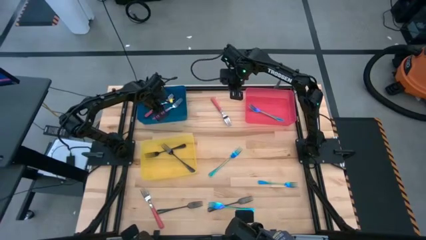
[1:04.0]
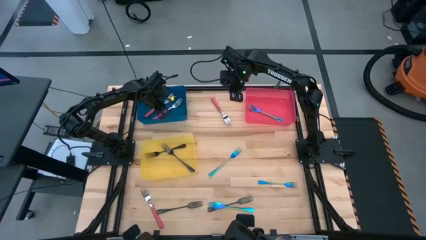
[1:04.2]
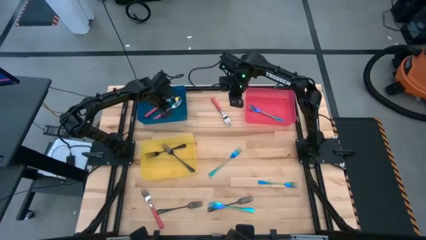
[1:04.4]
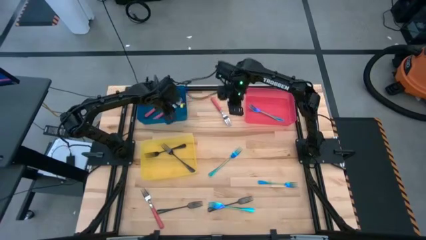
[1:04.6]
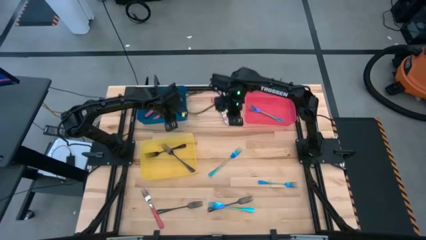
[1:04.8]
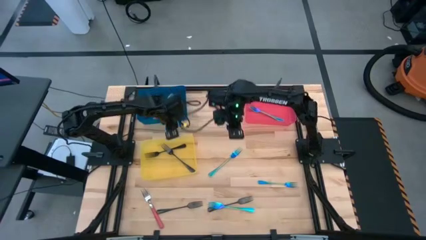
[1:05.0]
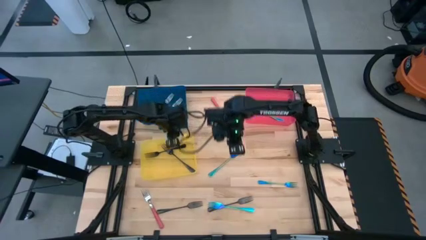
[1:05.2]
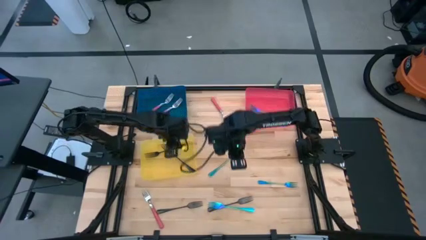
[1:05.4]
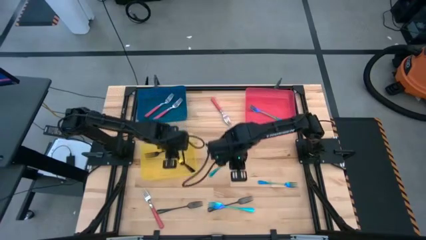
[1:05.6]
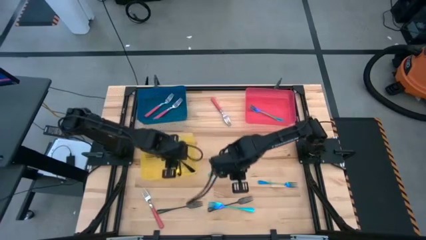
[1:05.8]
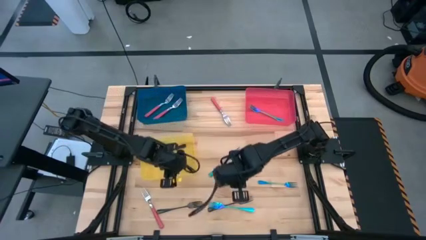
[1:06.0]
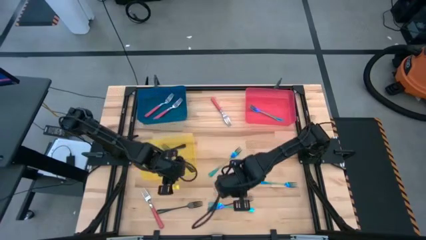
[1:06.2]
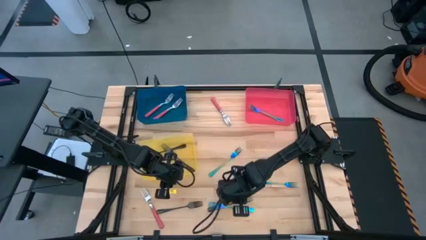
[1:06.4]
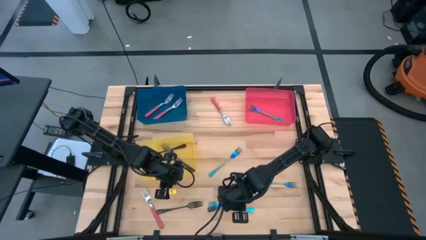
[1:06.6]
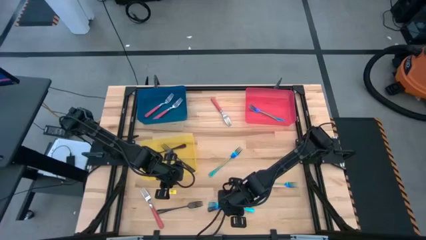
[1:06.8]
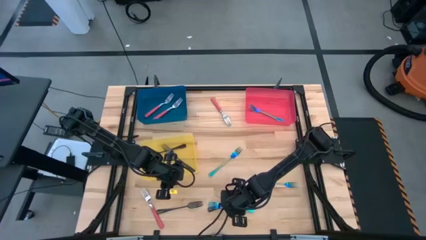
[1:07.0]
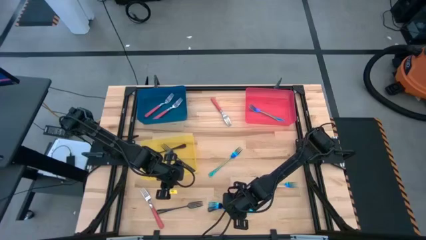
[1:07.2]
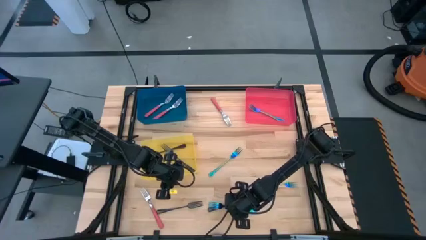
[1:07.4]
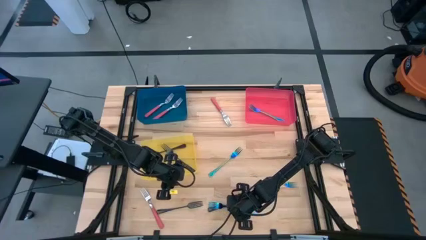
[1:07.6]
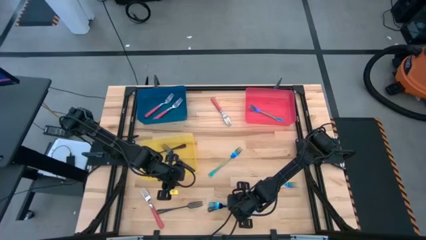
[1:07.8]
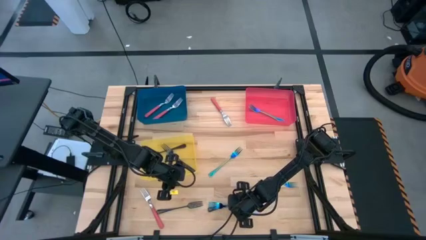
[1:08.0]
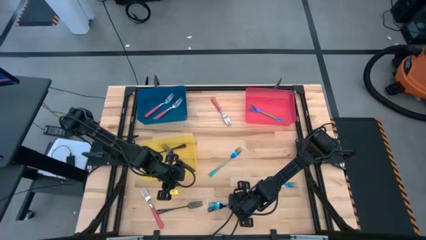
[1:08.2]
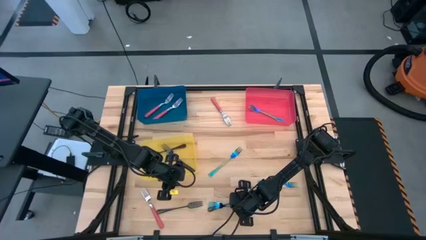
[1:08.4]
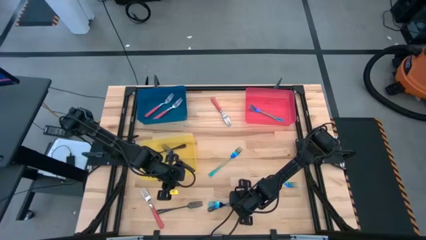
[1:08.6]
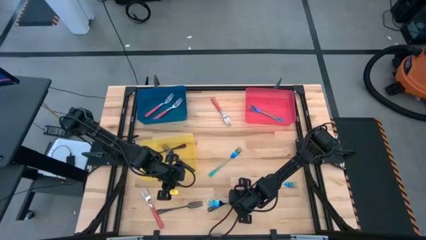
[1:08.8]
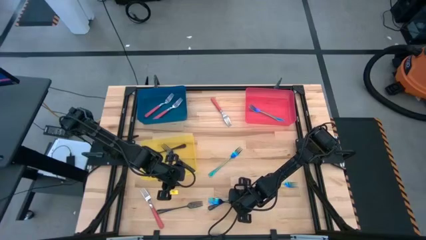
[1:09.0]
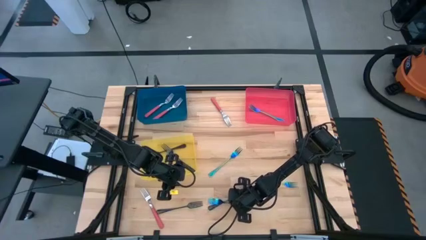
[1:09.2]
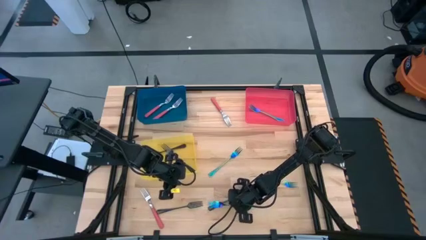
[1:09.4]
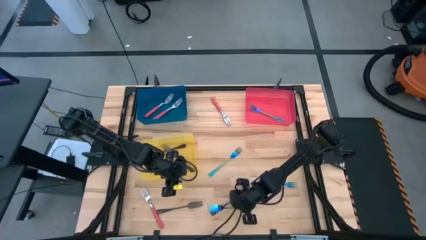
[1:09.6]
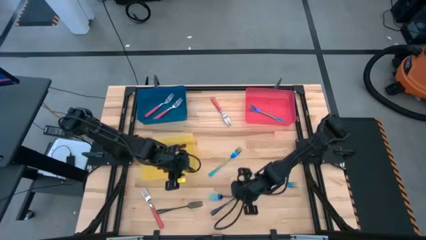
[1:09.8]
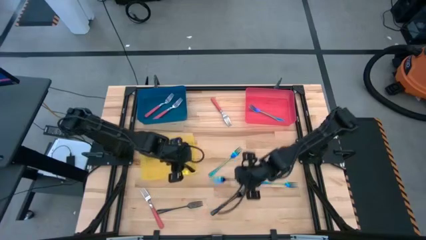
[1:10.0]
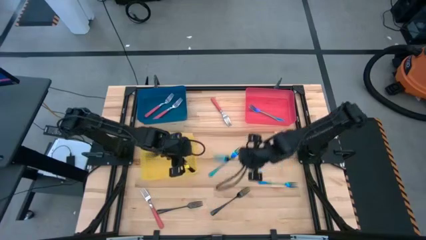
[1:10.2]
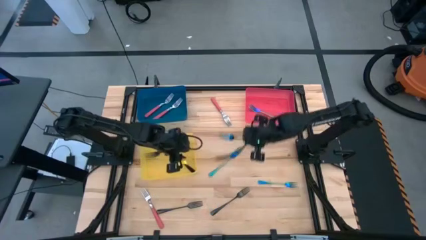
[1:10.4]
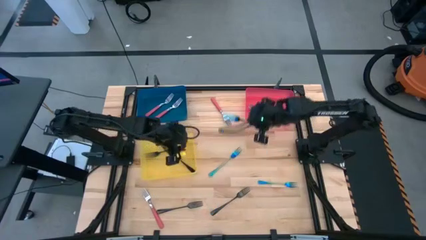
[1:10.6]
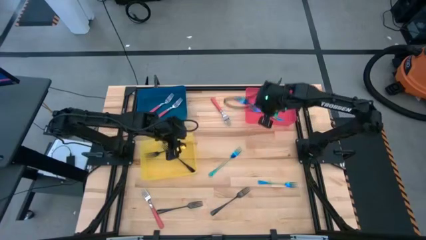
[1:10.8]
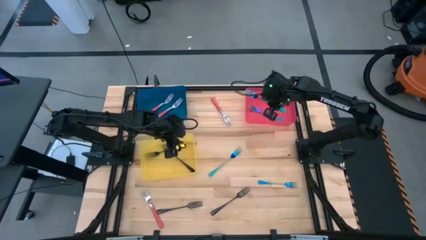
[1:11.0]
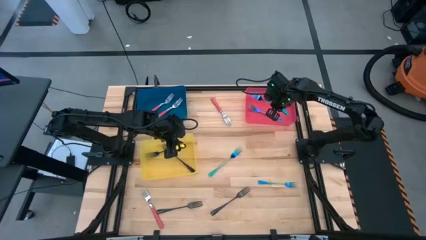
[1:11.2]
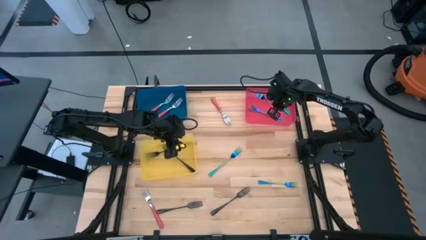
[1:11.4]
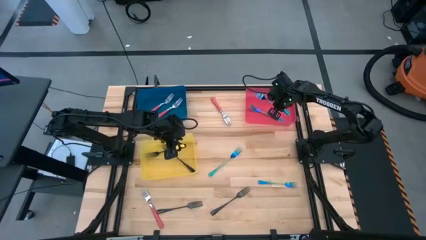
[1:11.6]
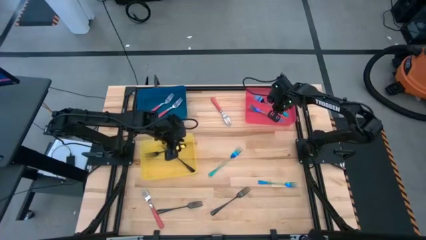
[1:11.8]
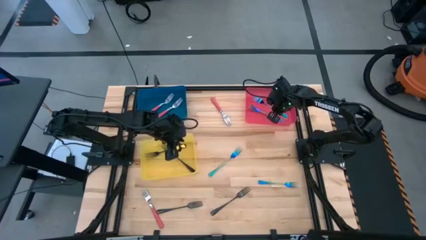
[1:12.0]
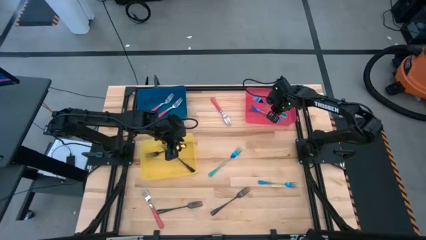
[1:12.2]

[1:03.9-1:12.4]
Task: Sort silverware by color (type)
Put the bottom blue fork into the red bin

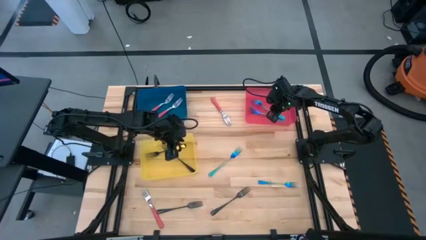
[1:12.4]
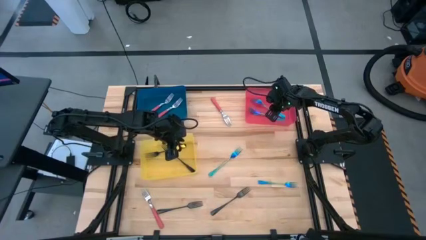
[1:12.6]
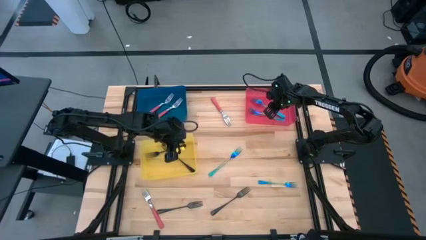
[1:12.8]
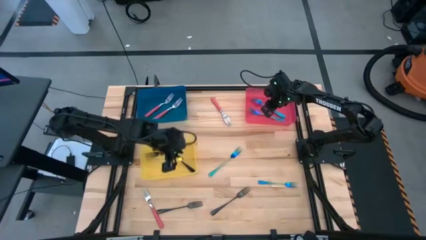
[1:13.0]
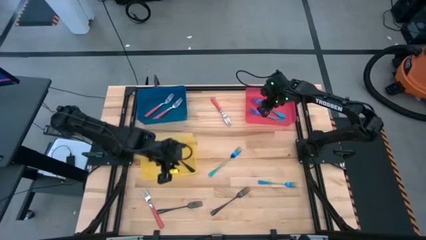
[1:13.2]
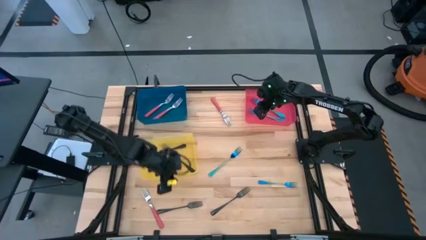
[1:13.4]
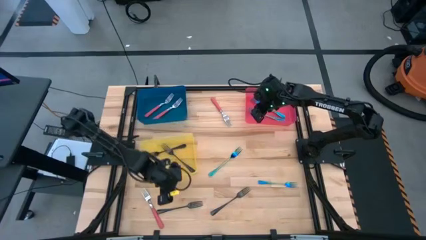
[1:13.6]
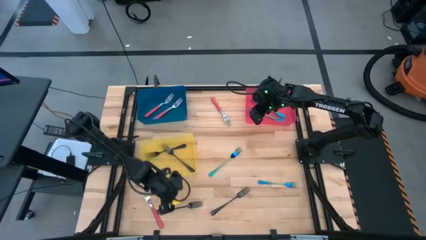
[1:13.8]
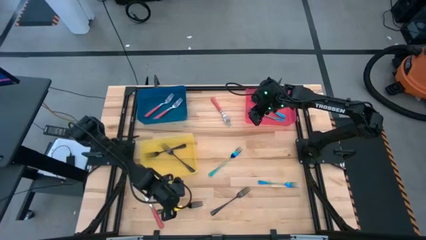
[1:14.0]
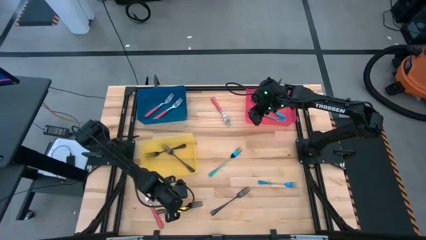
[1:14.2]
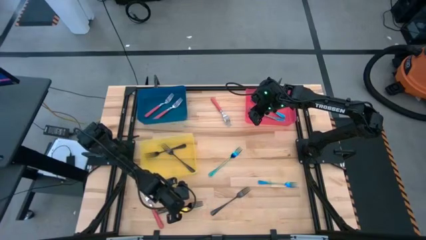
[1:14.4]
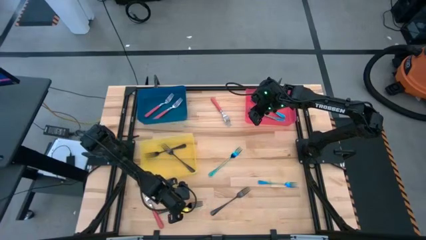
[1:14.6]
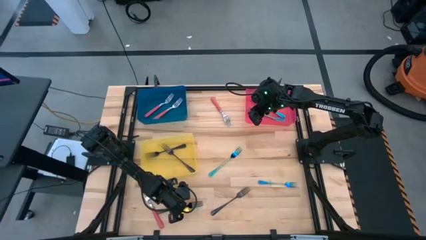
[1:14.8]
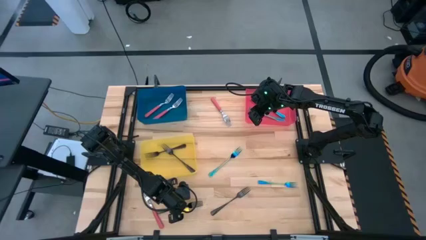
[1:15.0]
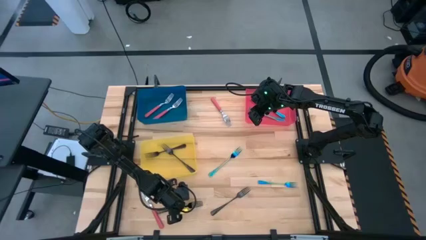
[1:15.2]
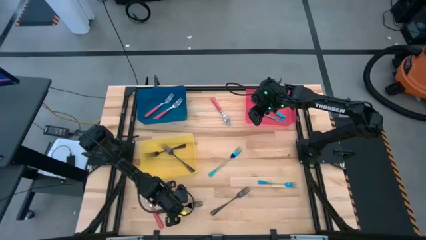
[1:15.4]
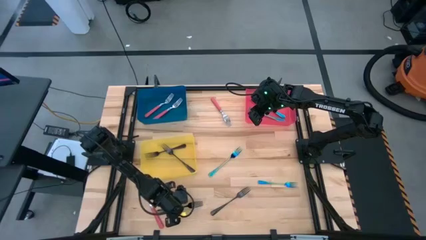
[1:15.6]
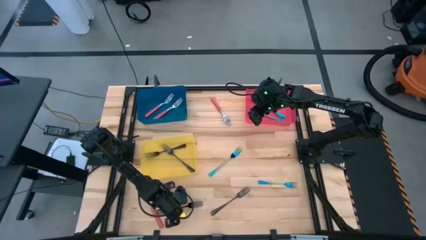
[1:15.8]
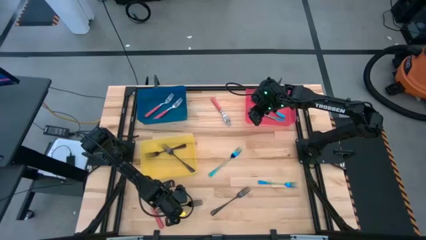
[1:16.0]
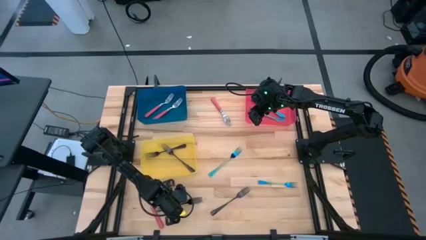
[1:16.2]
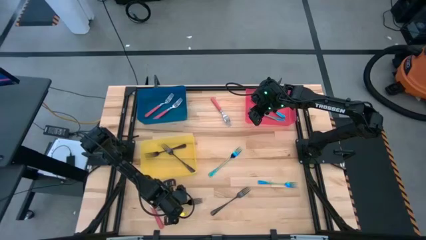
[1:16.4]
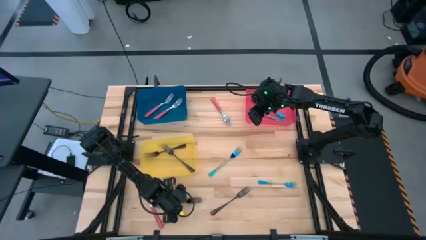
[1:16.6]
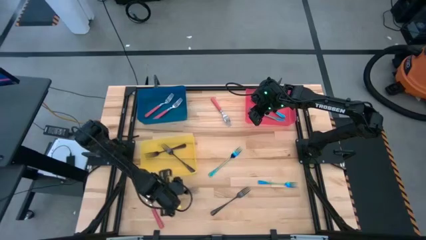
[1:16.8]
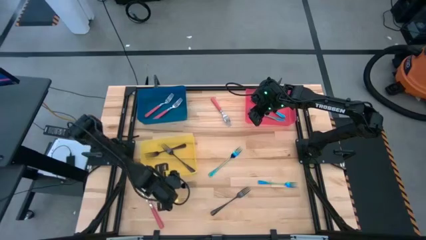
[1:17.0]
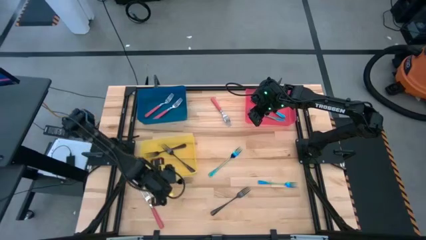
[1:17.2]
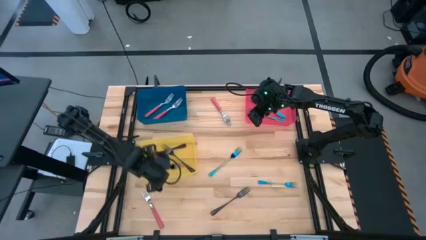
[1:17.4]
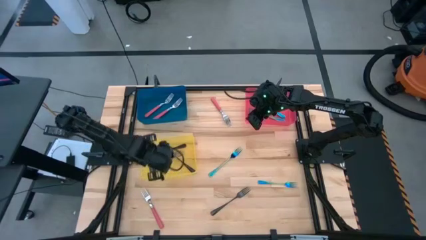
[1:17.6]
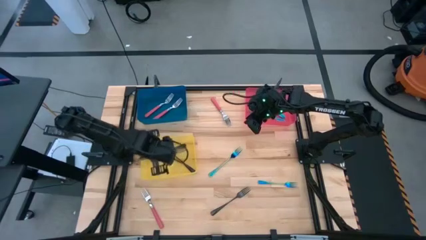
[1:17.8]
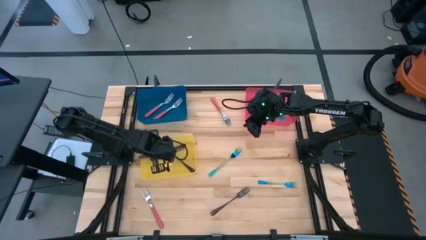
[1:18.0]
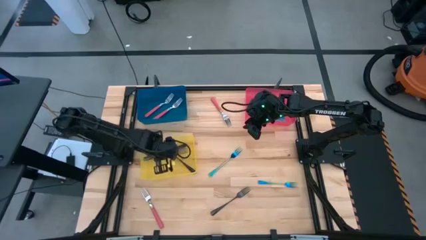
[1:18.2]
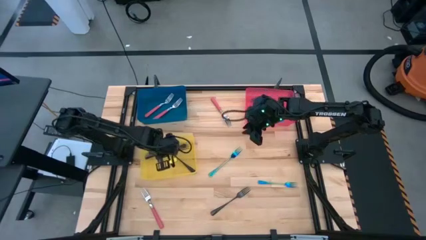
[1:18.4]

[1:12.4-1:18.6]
Put the left black fork into the yellow bin

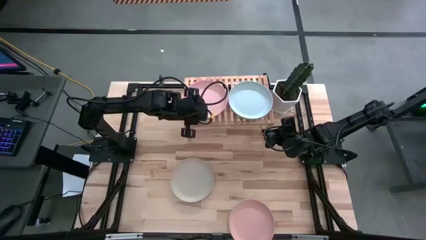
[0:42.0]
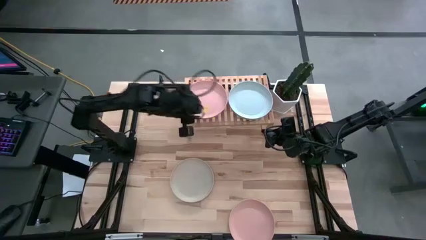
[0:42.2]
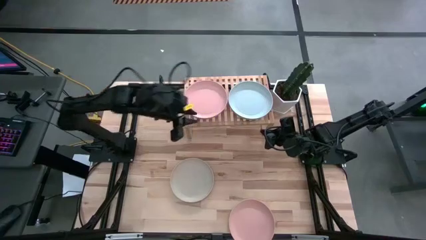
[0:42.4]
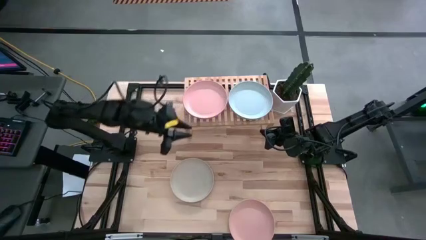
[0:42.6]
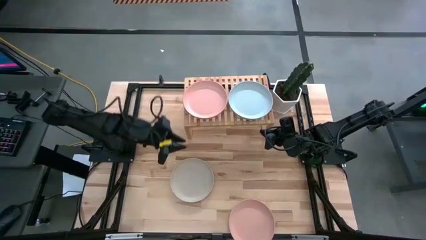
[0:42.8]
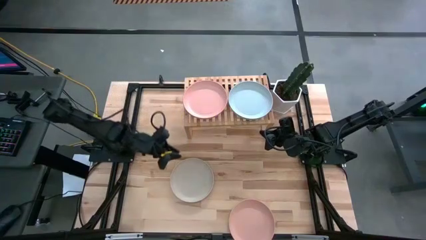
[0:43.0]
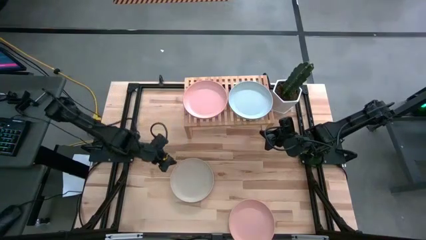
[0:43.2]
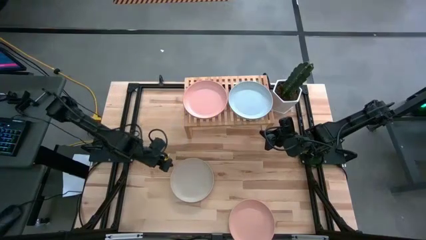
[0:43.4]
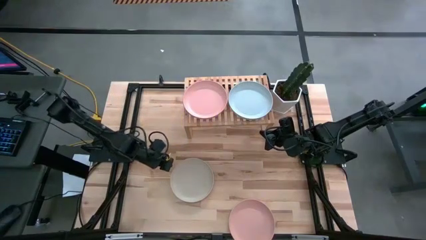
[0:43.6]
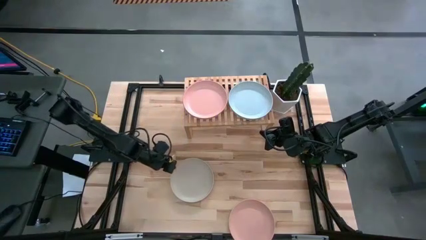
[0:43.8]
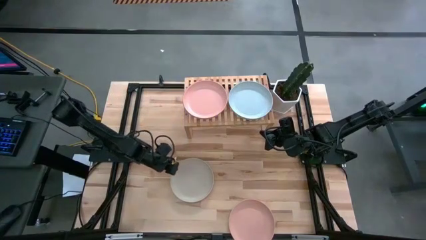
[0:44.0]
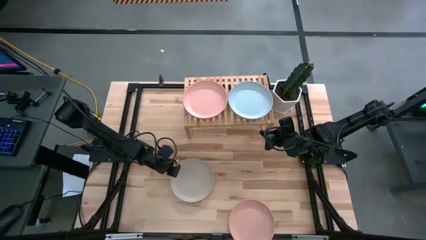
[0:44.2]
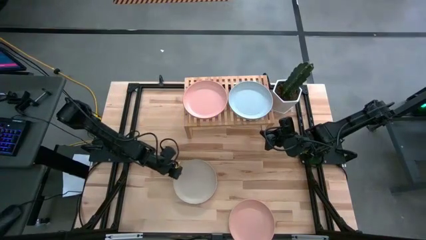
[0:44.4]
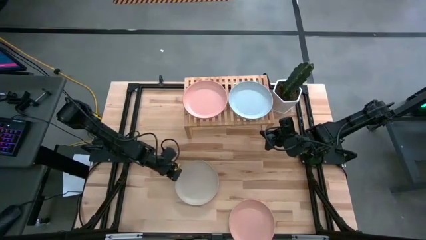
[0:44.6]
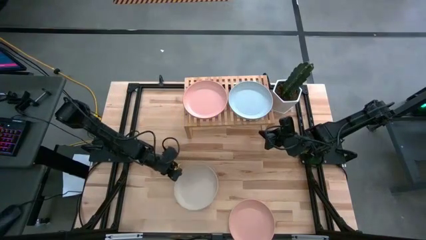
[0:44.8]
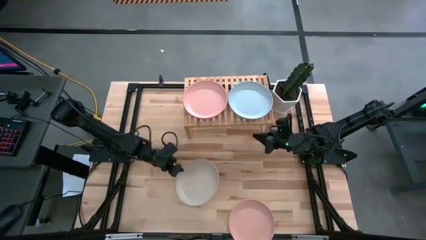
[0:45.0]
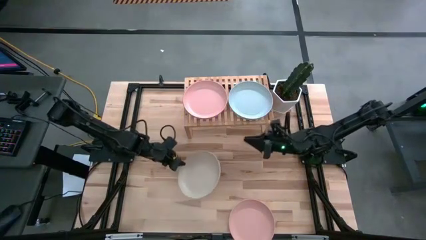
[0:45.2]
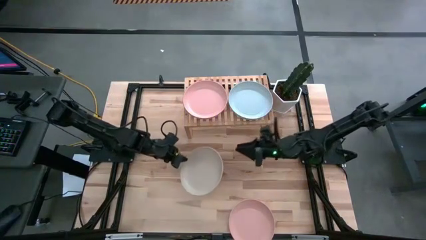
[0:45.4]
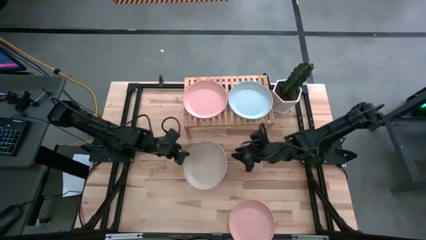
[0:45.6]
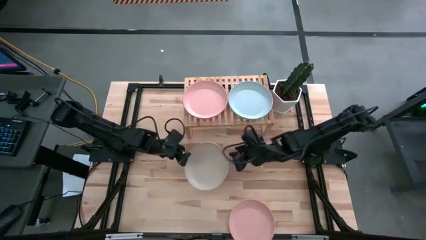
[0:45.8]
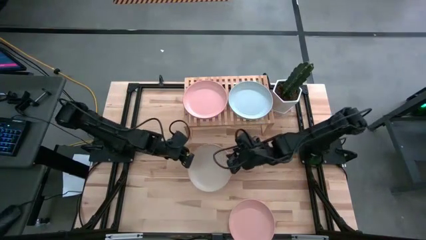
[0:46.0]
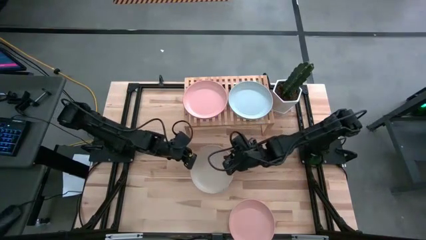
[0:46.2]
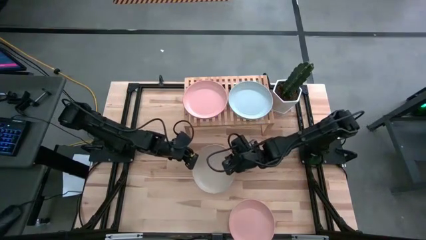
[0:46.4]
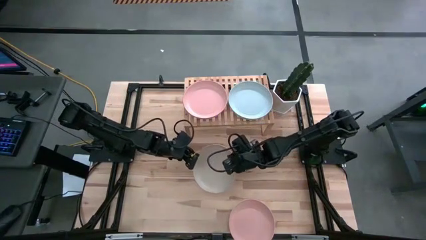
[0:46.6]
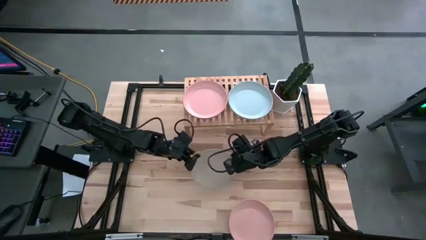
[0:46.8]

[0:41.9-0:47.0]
Task: Place and stack plates onto a shelf
Stack the gray plate on top of the blue plate on the shelf
